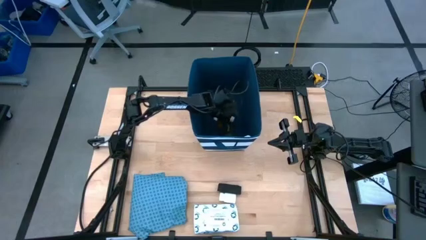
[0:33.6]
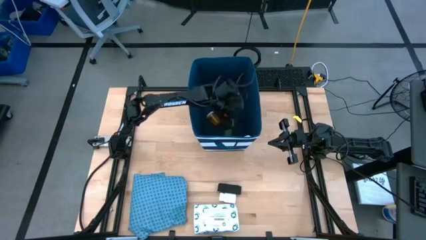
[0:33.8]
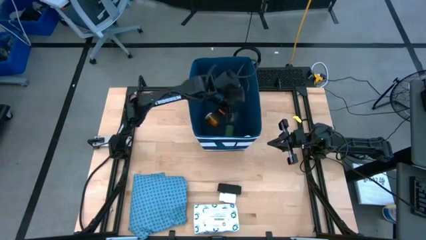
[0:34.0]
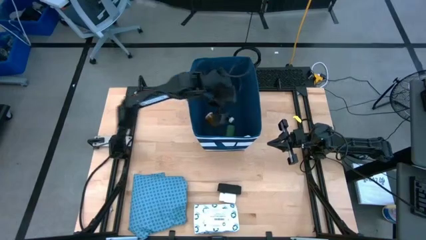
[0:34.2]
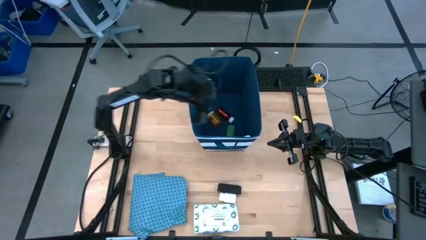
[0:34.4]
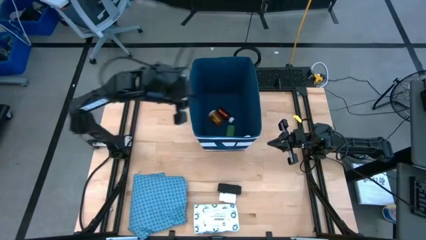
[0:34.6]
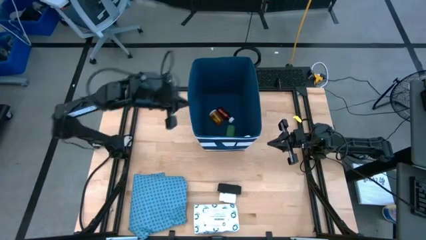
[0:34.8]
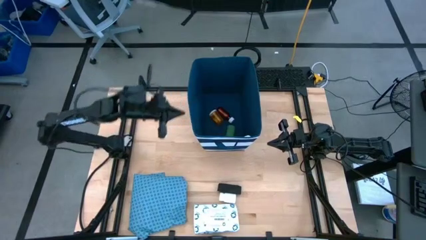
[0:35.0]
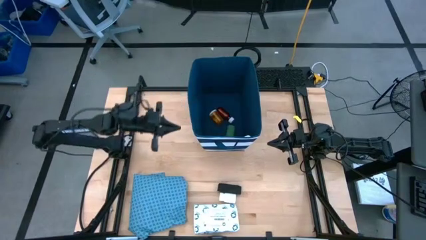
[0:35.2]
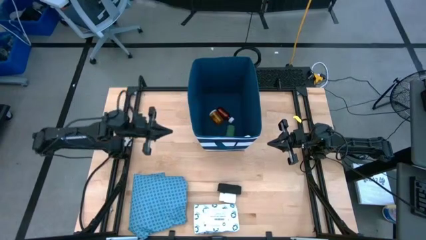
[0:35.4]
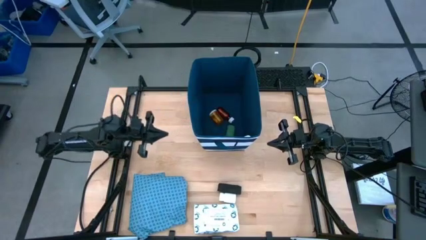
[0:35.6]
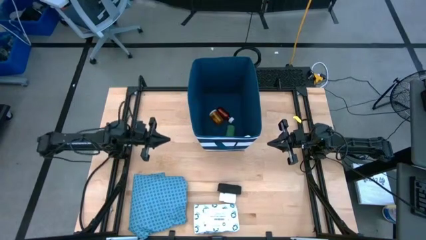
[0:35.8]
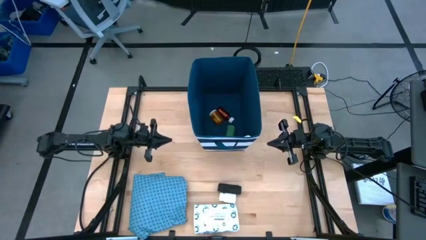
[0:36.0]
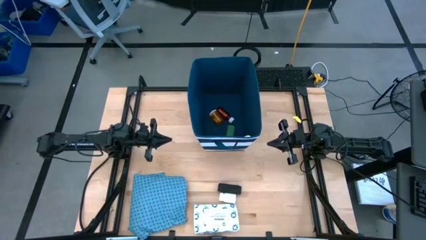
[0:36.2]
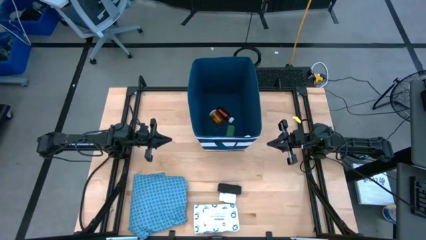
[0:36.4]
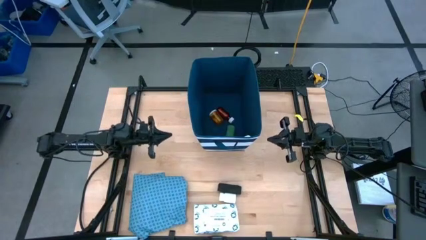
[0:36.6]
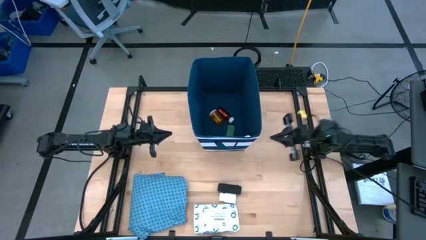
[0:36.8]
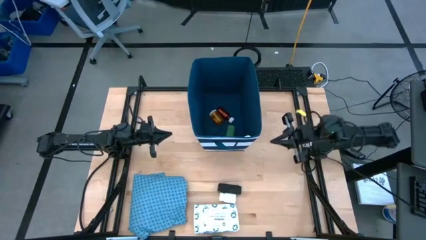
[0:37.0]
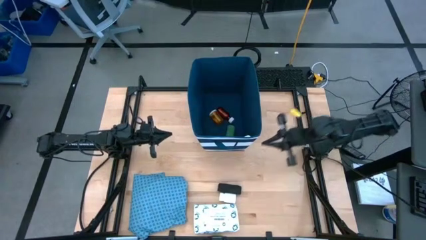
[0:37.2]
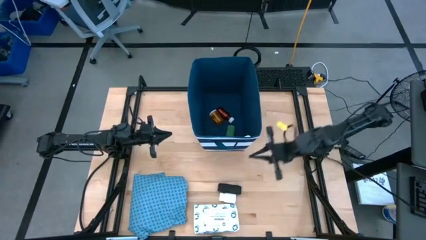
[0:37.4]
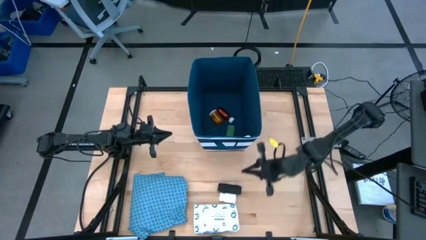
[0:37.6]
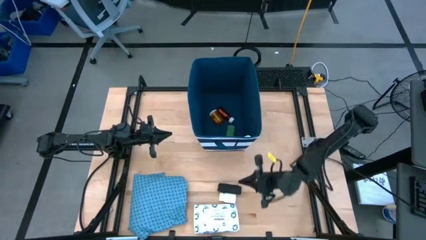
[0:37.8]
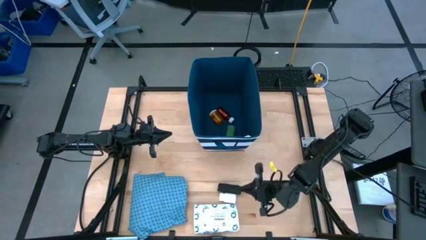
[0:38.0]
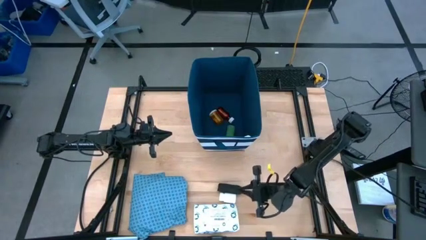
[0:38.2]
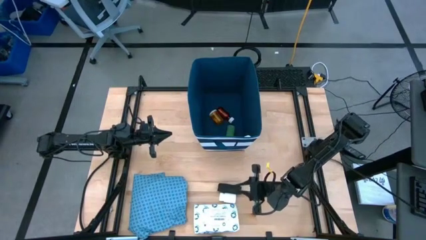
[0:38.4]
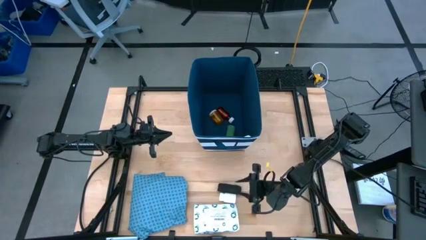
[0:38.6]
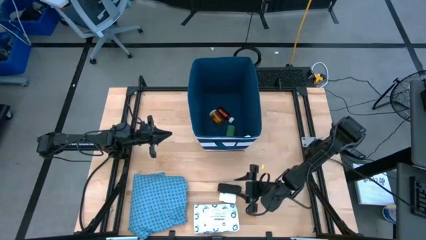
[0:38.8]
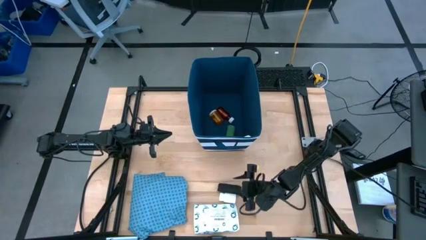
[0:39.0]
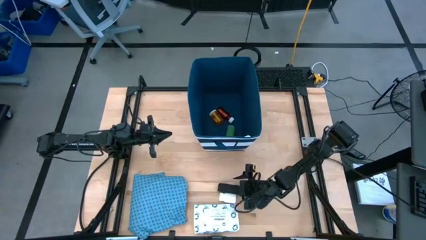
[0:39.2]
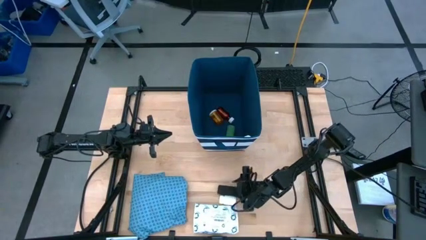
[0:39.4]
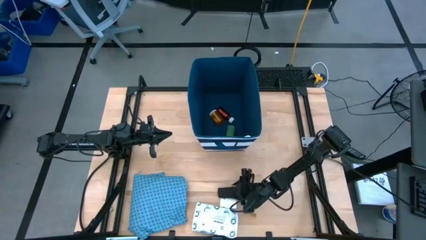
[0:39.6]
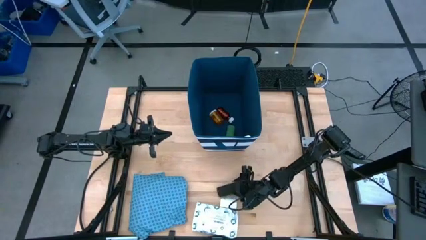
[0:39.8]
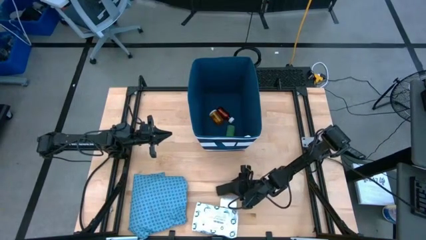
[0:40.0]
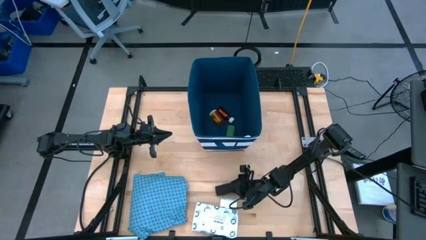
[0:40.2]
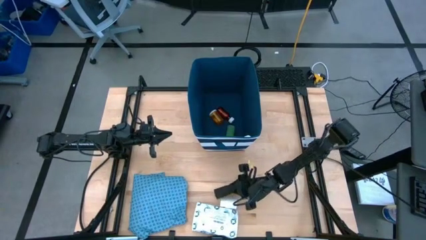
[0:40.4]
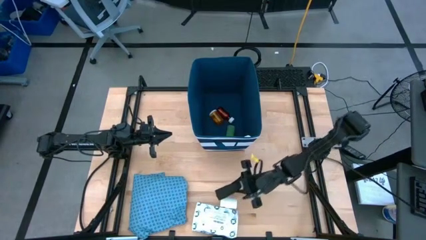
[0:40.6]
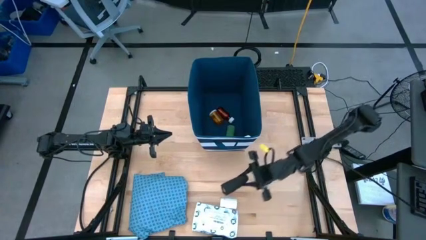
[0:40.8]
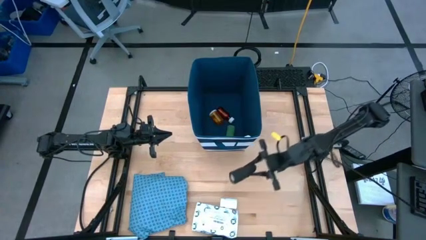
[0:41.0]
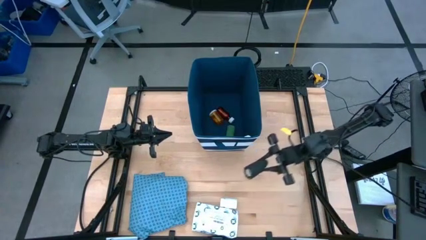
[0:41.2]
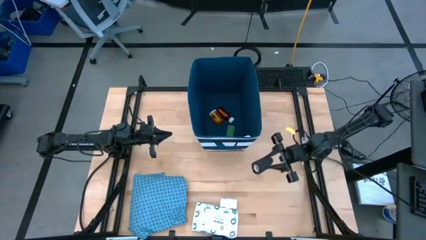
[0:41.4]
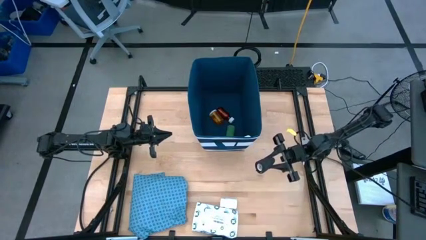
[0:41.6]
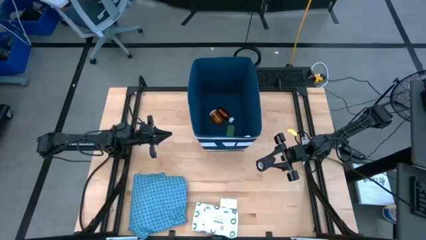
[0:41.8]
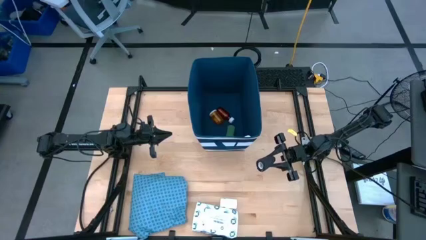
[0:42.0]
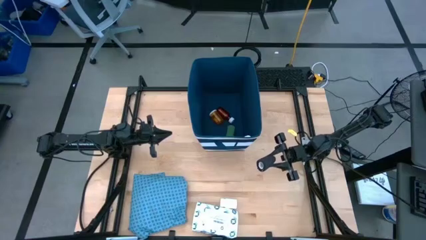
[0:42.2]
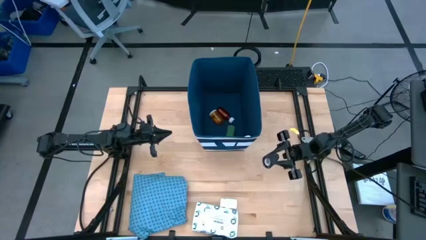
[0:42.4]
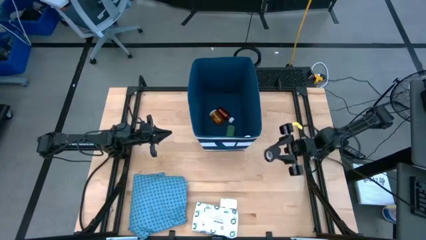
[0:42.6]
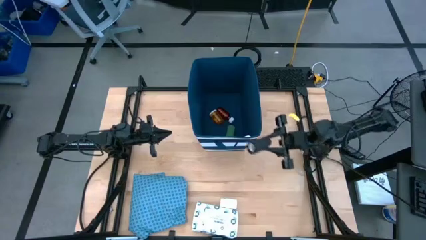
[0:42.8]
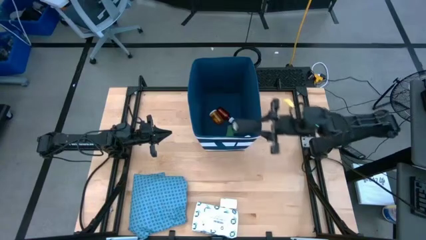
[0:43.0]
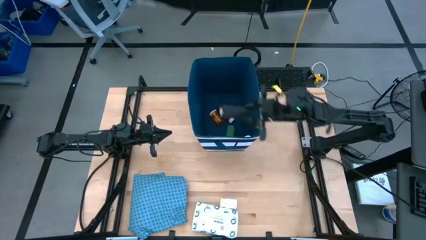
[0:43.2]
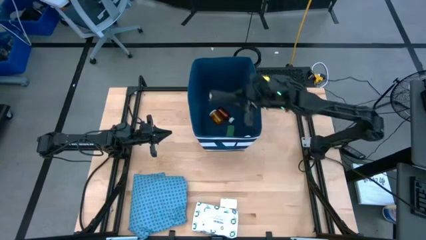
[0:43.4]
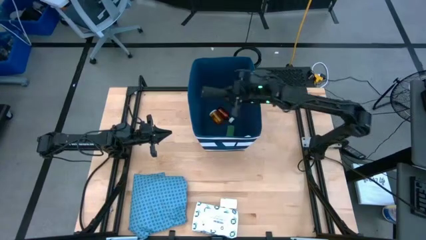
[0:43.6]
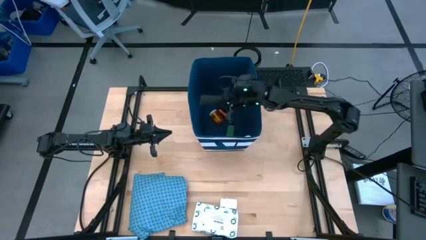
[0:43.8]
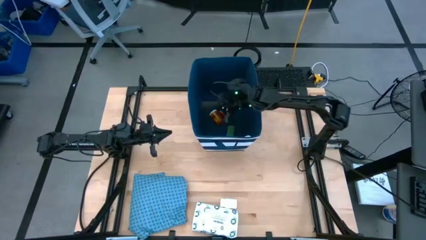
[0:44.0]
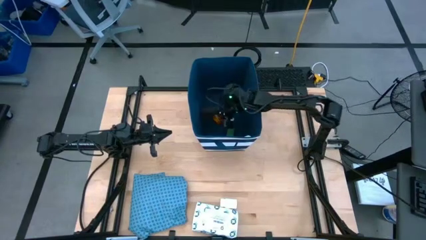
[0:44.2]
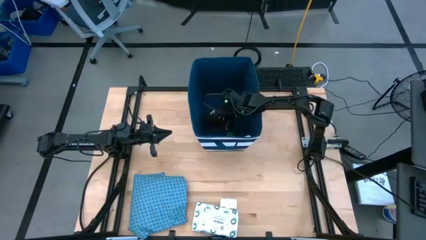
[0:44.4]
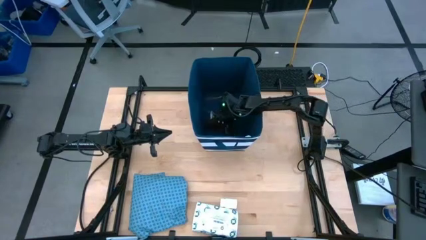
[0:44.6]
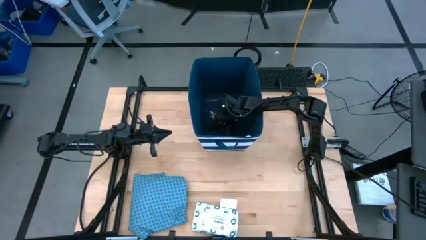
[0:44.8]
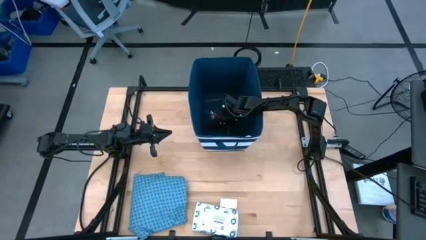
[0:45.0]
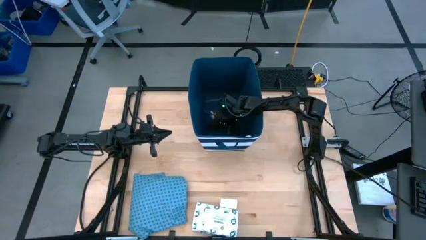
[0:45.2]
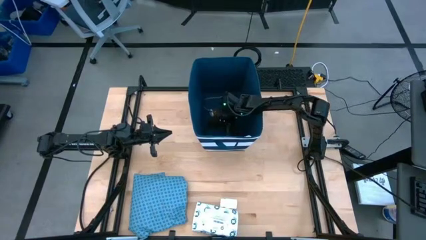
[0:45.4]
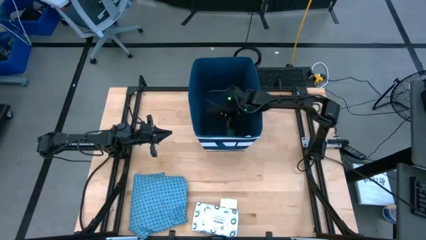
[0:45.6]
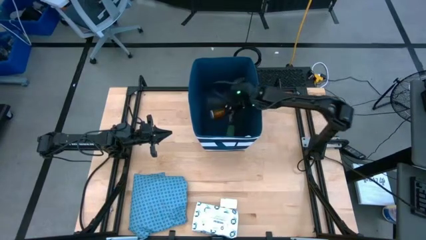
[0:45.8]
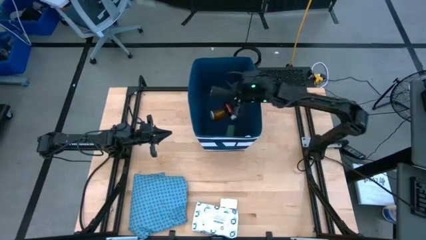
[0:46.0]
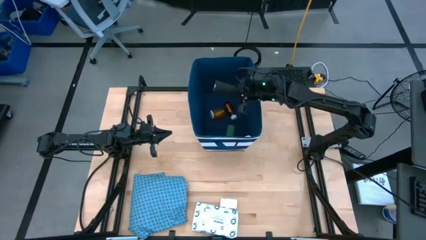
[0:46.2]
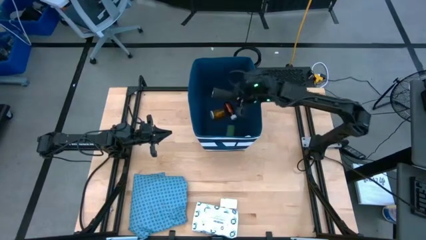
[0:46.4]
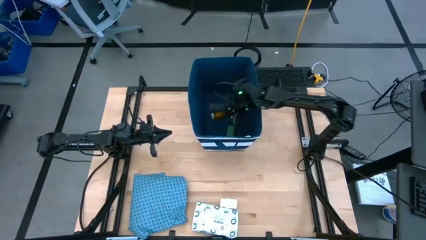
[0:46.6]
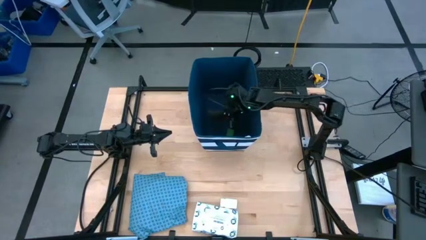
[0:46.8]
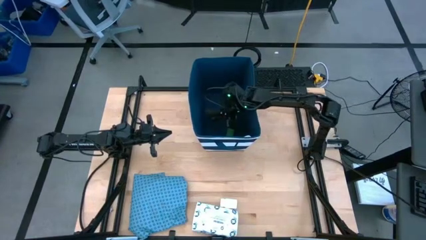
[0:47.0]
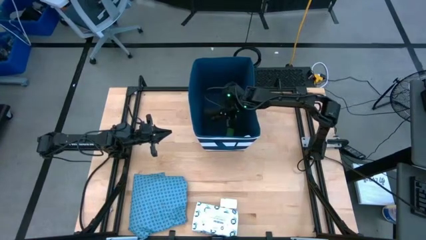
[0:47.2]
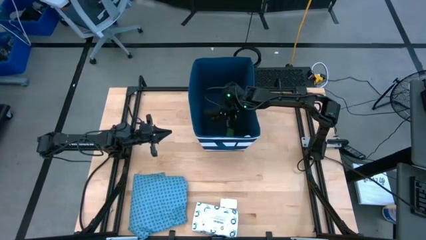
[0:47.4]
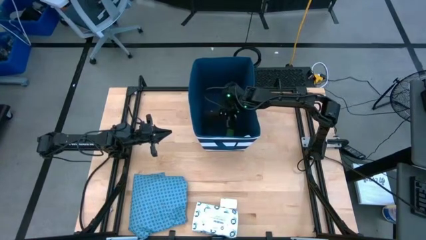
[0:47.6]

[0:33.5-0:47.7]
Task: Pick & place medical supplies in basket/bin
Put the black bandage into the basket

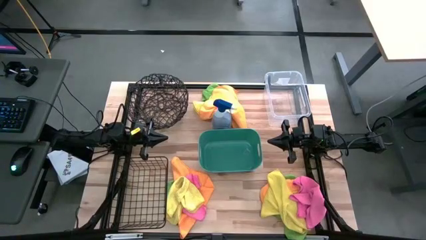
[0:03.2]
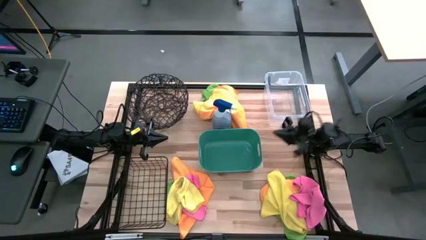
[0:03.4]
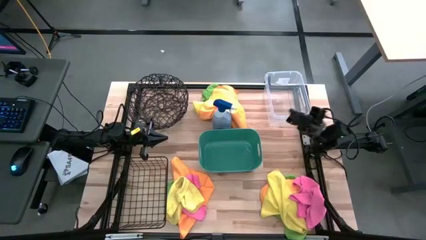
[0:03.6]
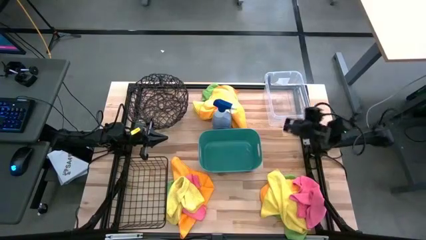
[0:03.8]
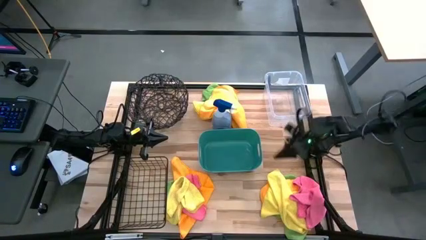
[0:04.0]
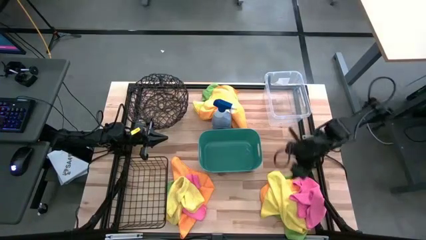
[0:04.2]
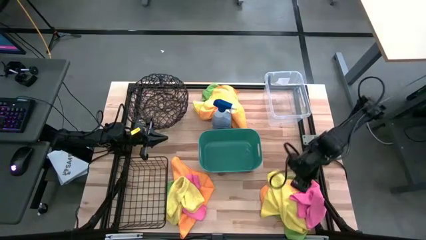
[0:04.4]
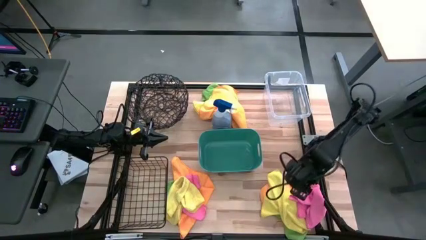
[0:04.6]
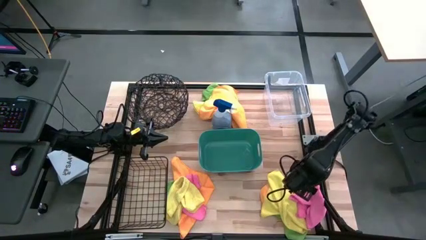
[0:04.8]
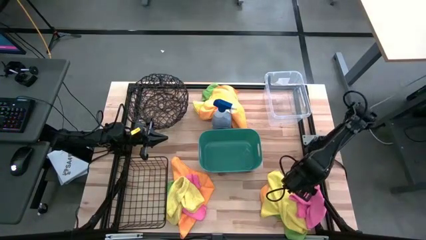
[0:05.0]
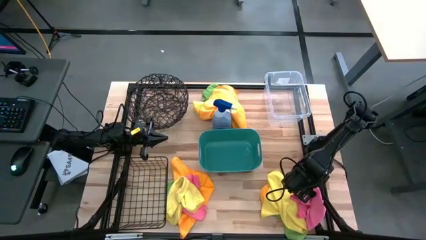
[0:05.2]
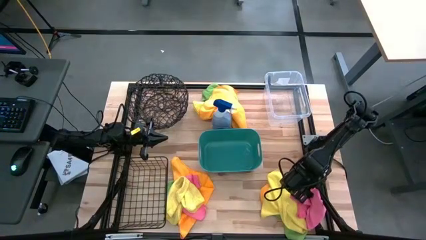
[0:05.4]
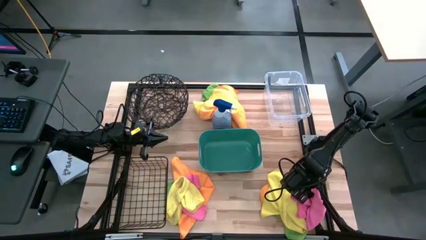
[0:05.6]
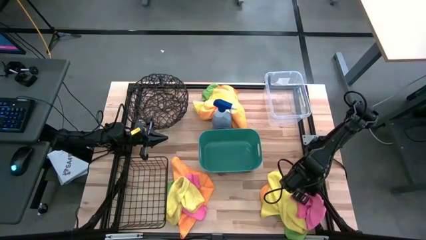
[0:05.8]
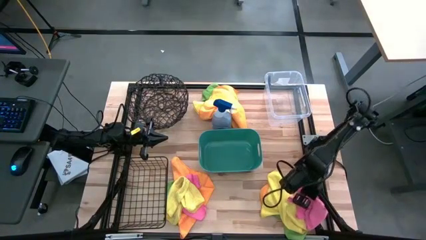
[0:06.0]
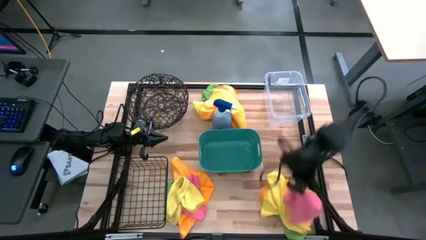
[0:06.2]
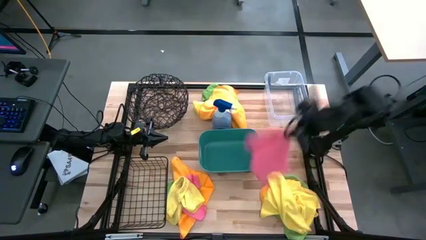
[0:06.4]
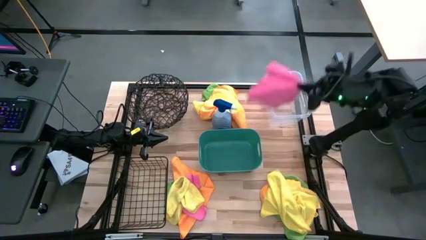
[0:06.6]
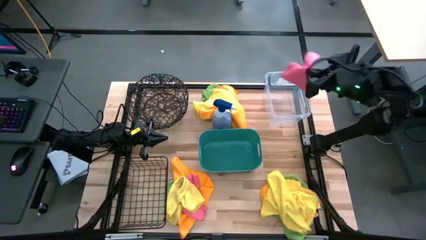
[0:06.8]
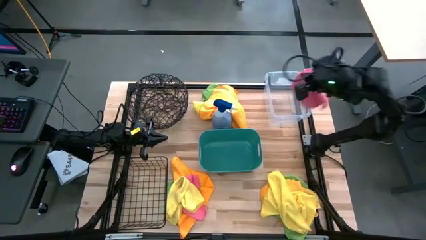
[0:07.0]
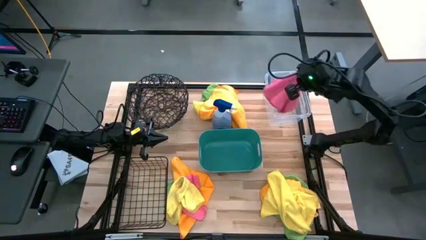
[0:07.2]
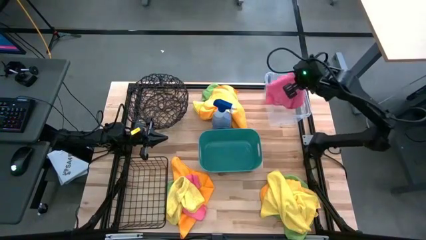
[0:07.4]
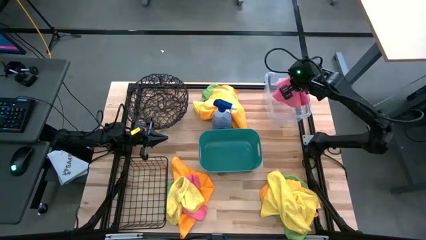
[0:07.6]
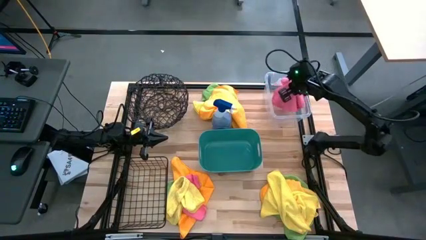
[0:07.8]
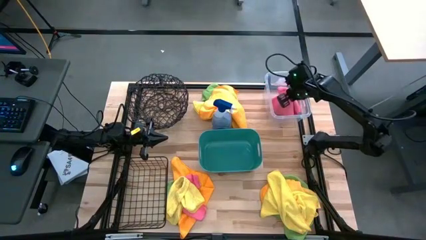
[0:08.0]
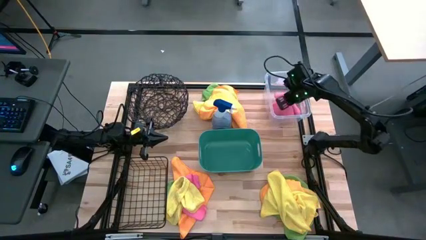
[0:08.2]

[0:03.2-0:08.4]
Task: Sort microfiber towel by color & place in baskets
Put the right pink towel into the transparent bin
